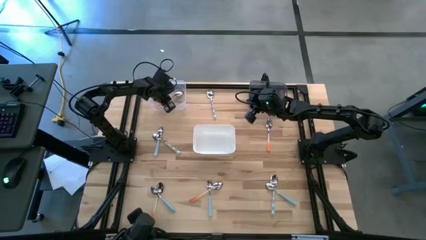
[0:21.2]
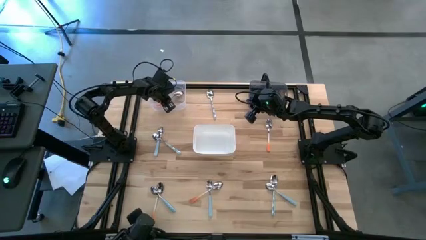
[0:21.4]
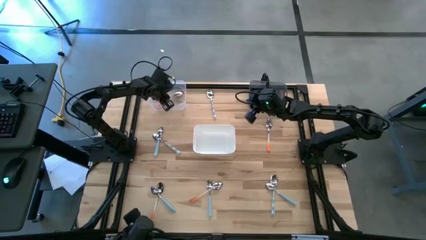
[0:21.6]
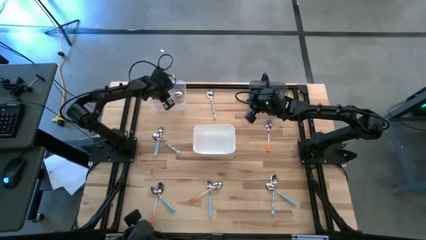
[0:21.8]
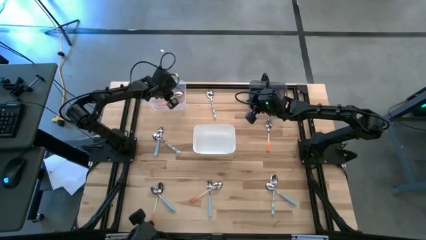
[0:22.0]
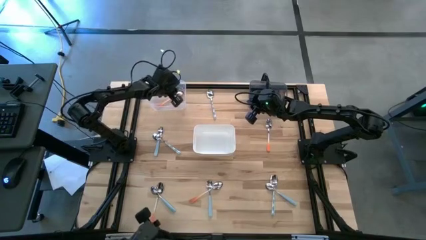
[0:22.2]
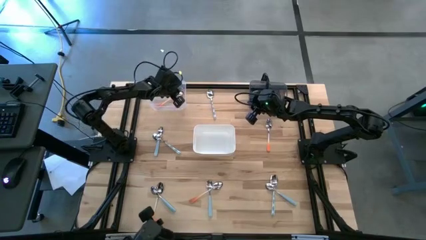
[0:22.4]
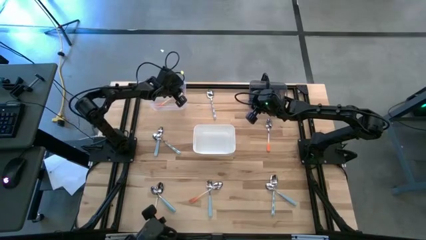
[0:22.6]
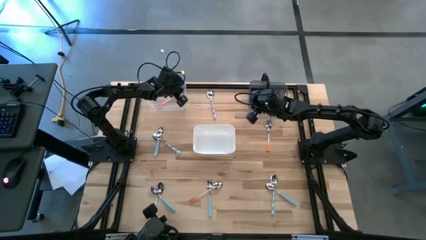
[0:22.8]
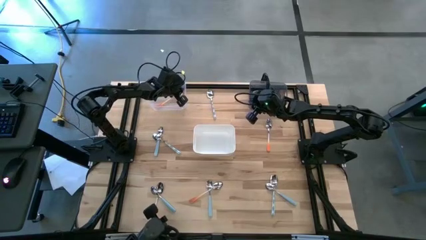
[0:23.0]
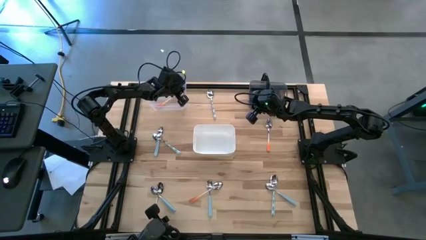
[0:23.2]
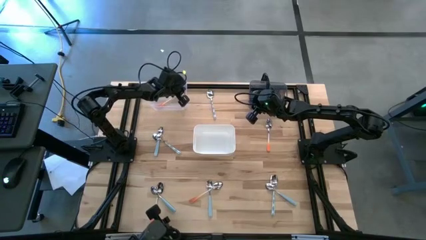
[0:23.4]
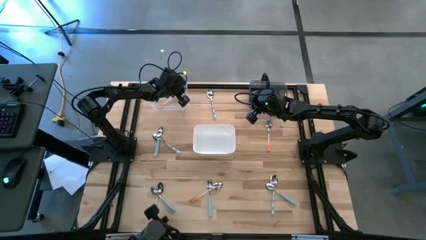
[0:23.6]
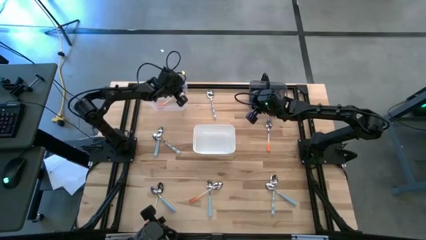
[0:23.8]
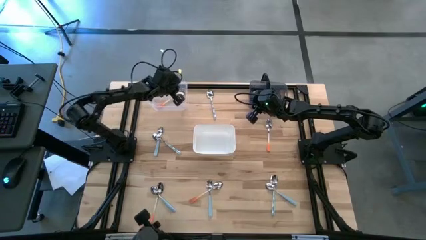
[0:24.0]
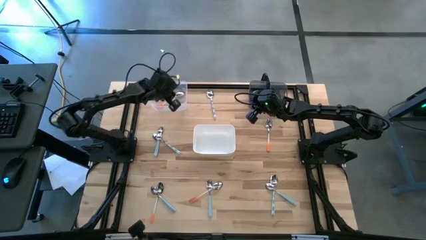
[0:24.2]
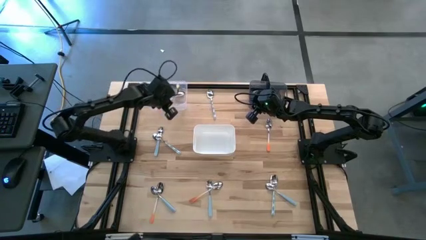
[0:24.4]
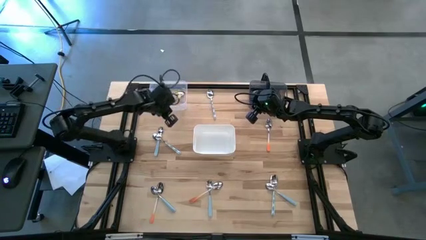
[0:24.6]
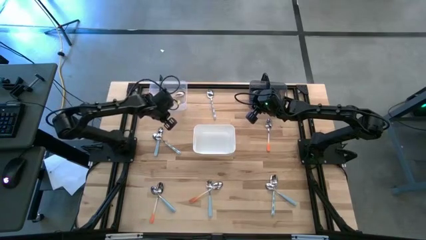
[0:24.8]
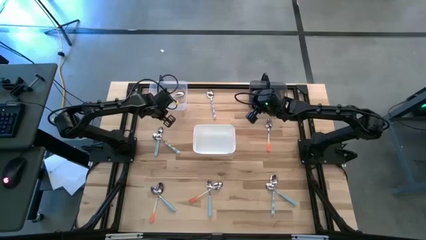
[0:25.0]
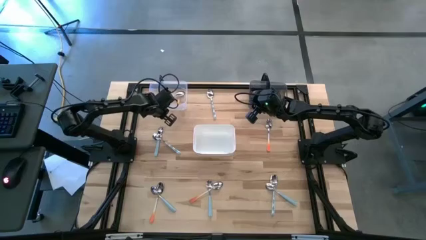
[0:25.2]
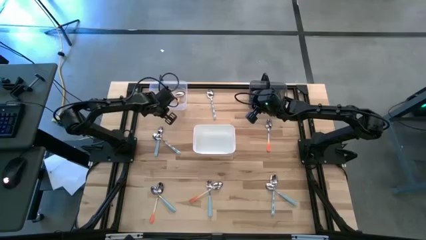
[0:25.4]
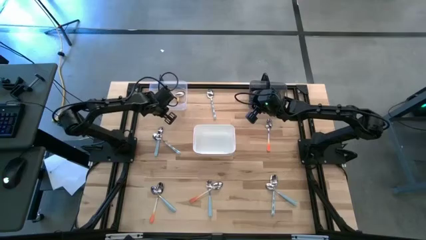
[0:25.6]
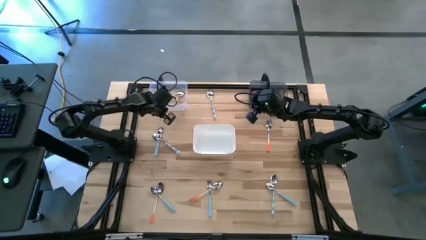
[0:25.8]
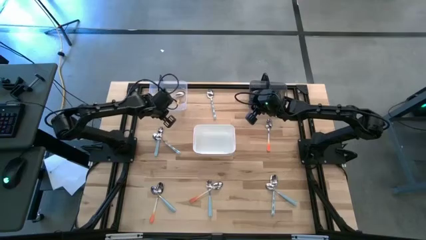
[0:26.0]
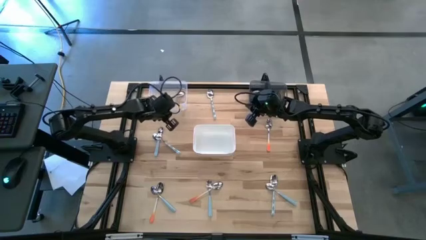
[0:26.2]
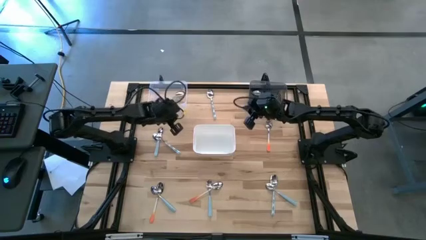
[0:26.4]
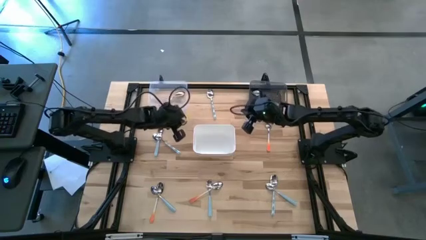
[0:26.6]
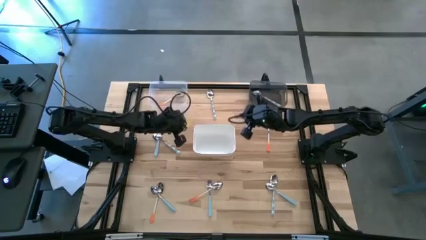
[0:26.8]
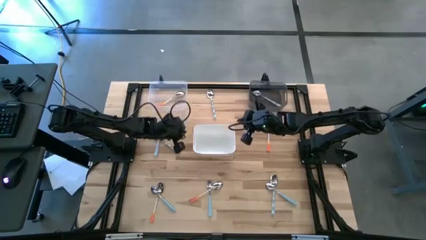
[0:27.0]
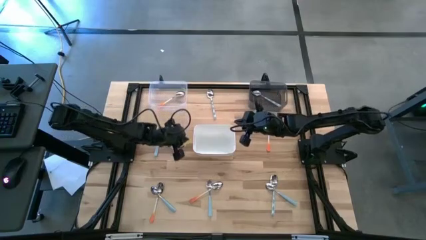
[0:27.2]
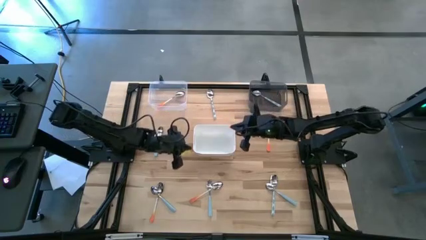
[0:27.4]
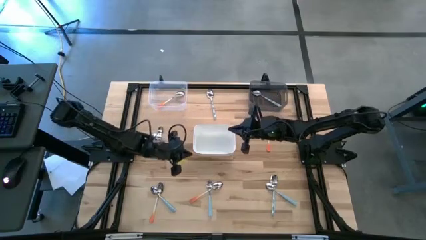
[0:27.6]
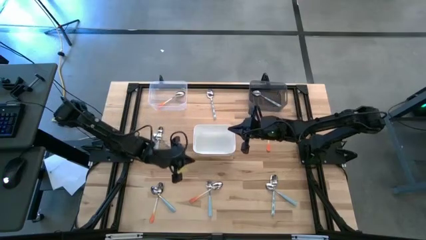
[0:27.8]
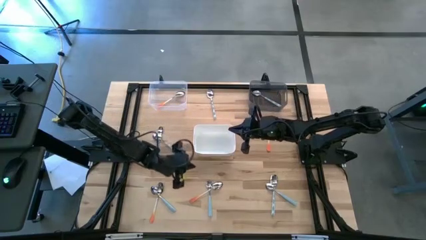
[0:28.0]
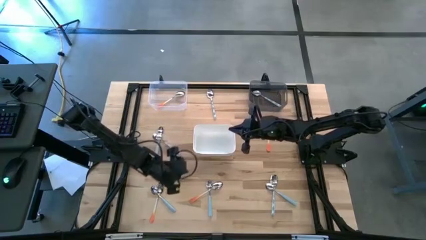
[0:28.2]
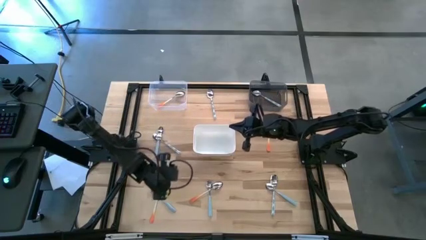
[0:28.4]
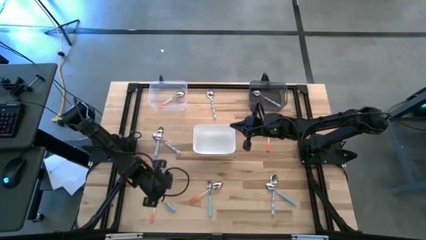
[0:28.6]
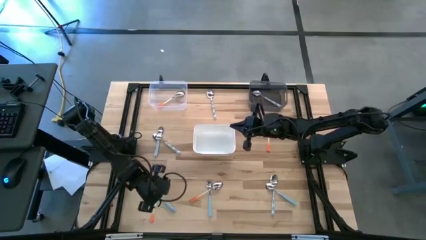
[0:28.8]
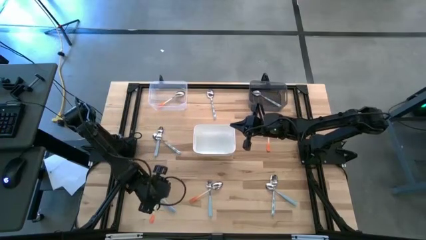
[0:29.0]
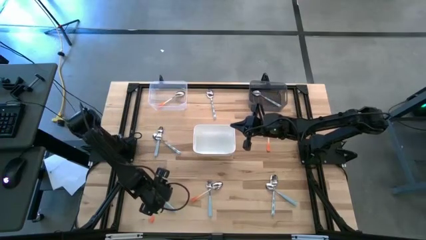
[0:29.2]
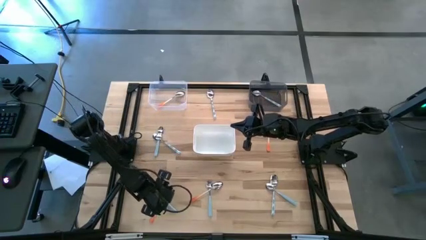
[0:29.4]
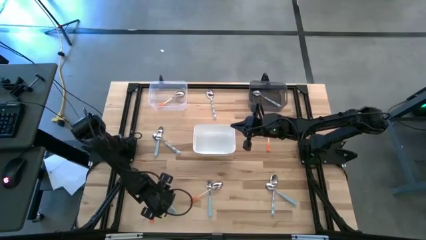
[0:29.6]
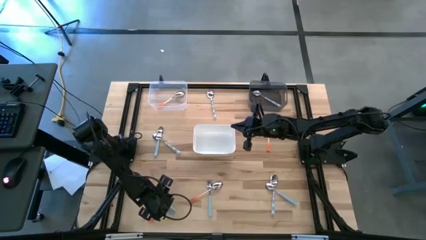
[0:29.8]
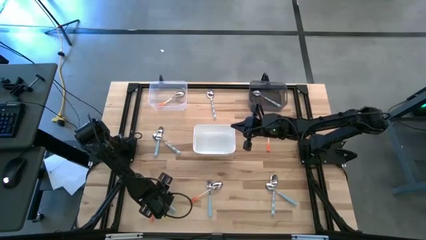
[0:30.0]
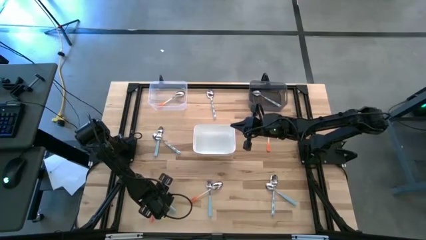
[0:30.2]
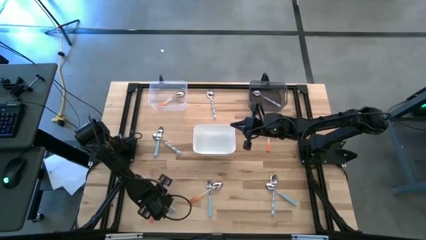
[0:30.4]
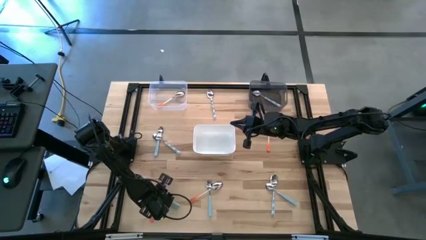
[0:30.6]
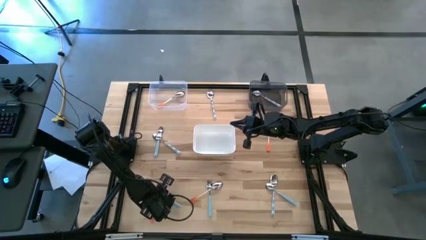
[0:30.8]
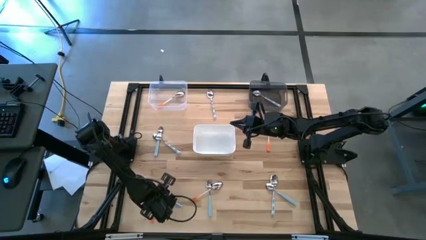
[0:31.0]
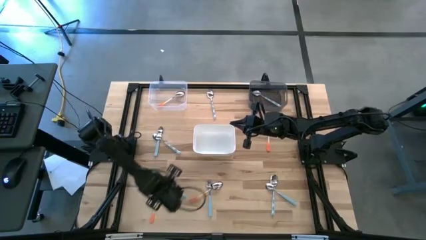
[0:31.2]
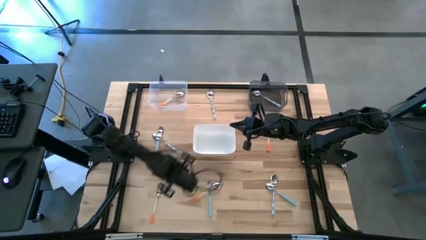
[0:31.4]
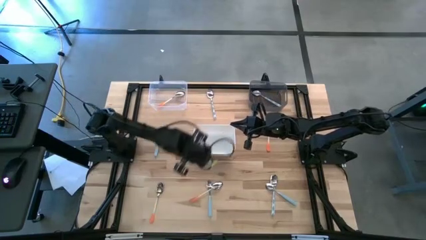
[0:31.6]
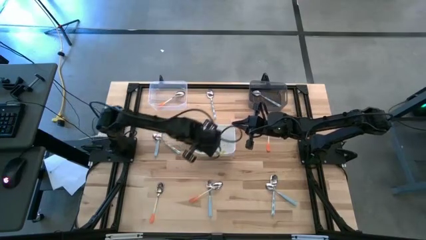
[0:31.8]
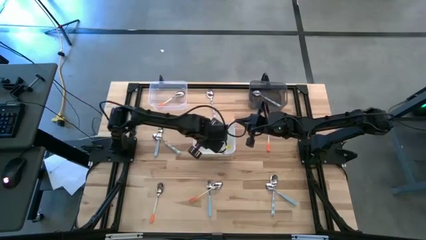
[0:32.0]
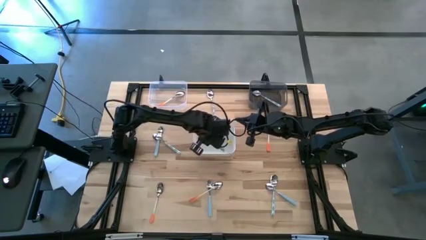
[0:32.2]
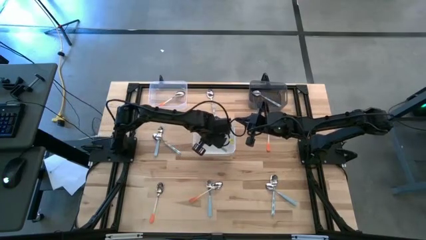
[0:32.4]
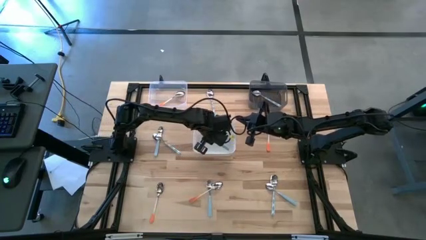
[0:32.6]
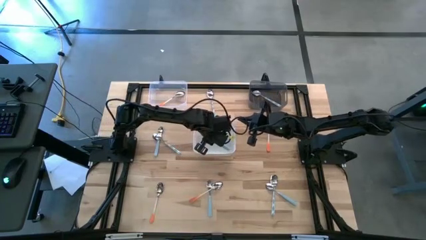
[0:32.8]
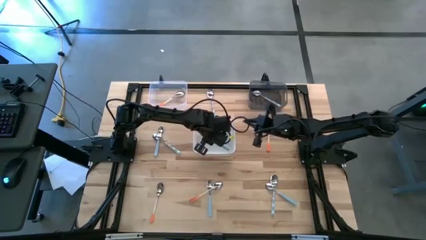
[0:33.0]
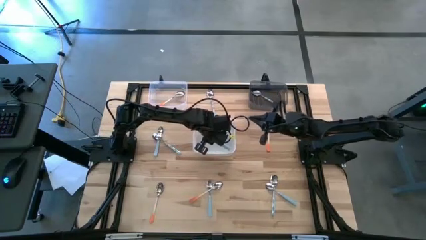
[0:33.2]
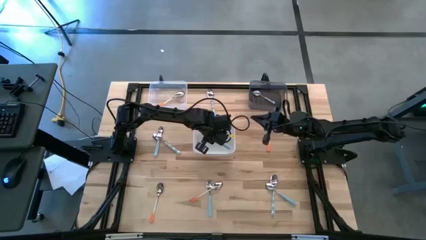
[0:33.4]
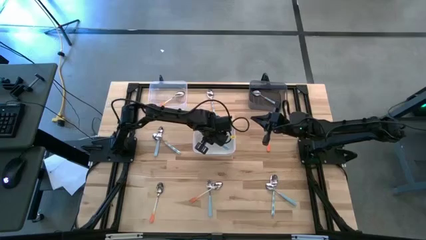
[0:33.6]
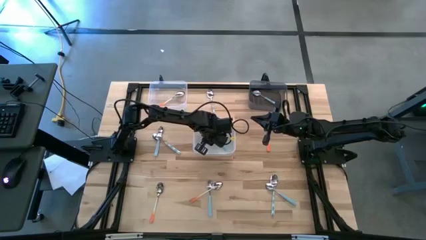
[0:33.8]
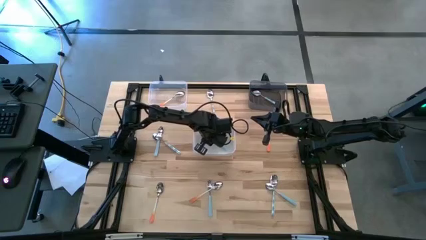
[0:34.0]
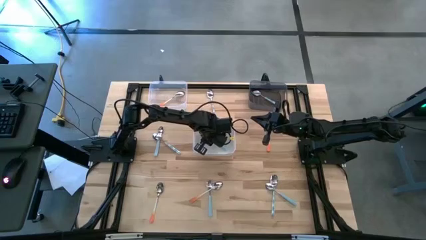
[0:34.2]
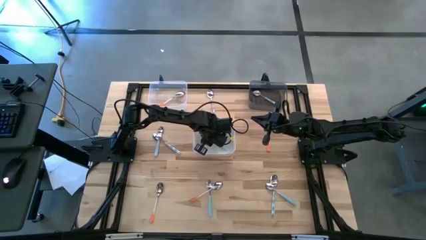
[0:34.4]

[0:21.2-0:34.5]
Task: Sort silverware by color (type)
Put the blue spoon into the white bin

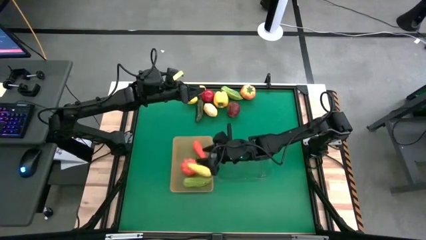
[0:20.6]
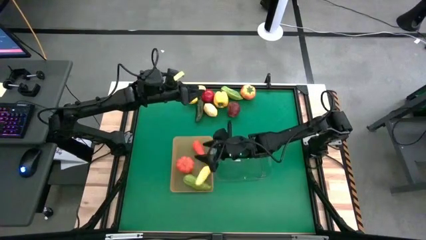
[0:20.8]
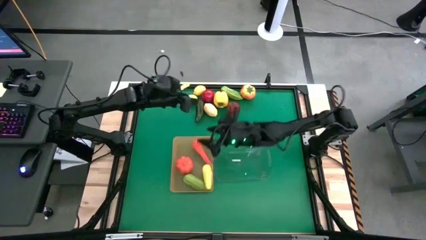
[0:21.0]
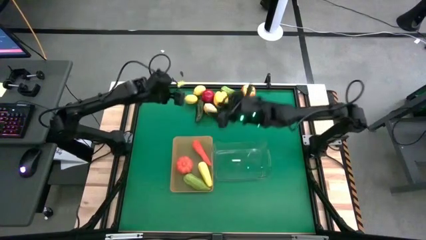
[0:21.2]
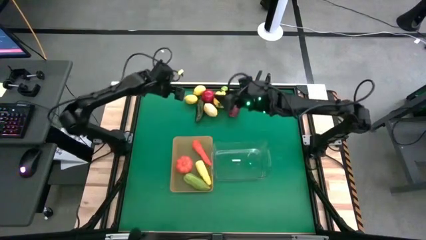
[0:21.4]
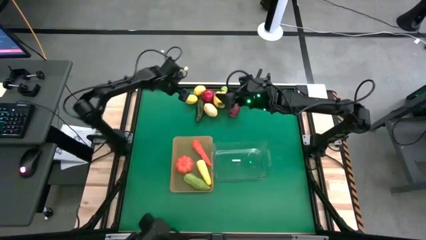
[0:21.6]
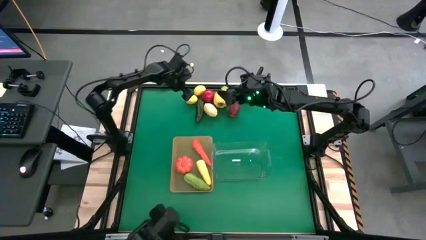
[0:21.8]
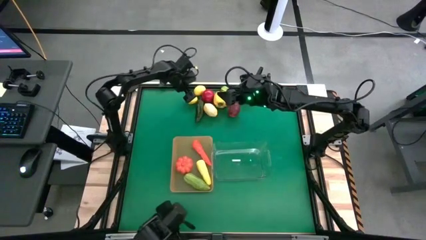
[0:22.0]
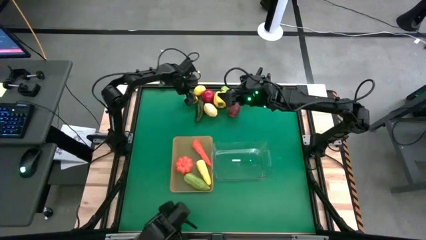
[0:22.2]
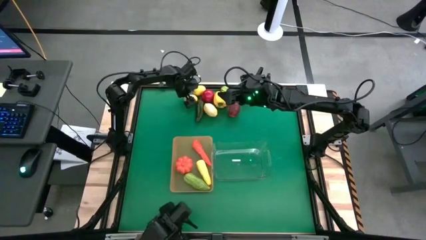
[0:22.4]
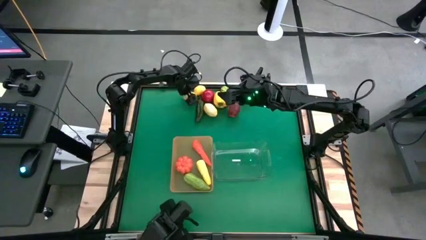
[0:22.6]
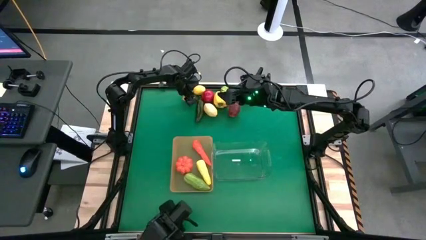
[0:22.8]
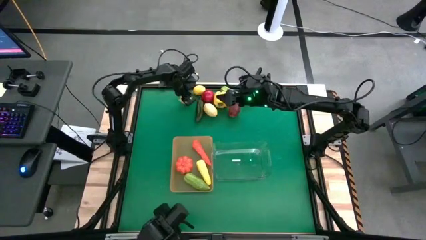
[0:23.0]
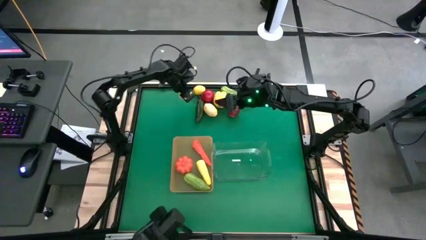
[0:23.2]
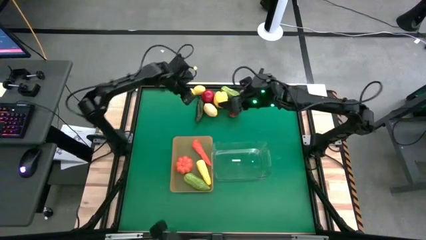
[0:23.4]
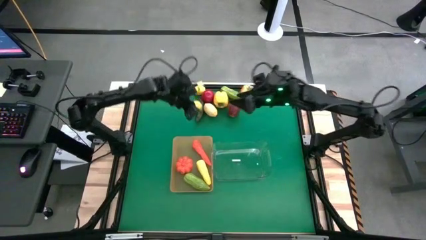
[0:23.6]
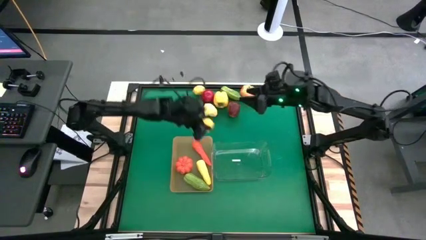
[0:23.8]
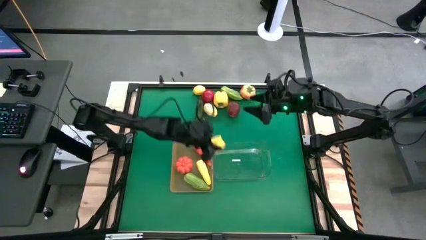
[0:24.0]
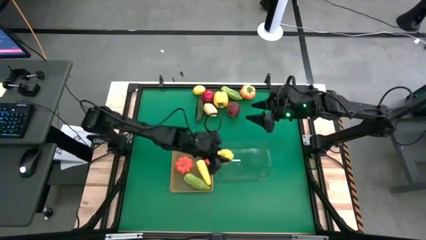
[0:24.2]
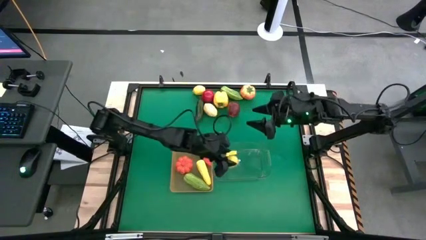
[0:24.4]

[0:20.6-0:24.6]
Task: Sort produce into baskets
Put the left lemon into the transparent bin
